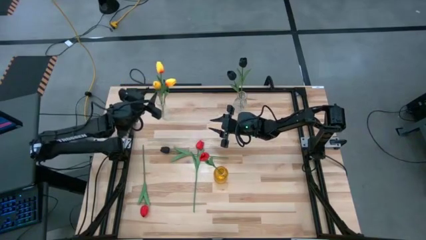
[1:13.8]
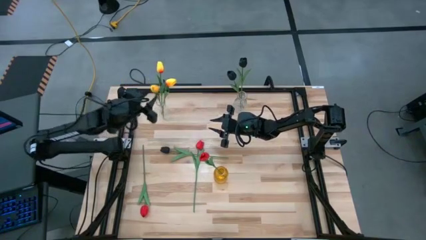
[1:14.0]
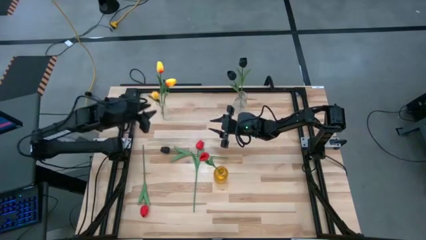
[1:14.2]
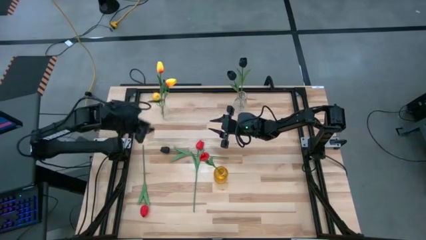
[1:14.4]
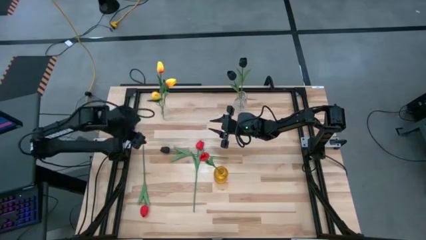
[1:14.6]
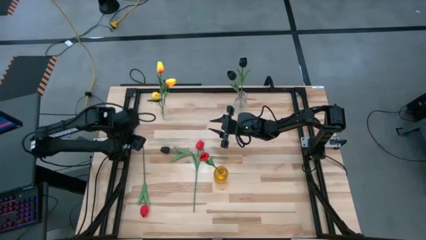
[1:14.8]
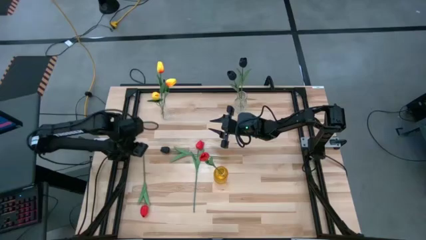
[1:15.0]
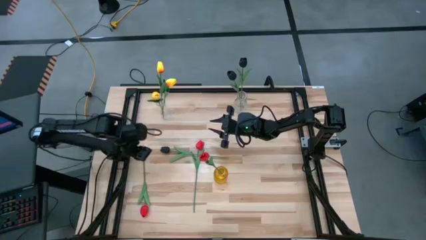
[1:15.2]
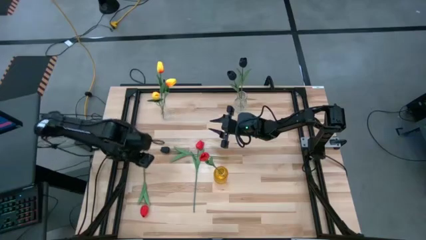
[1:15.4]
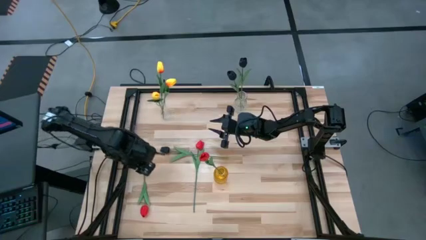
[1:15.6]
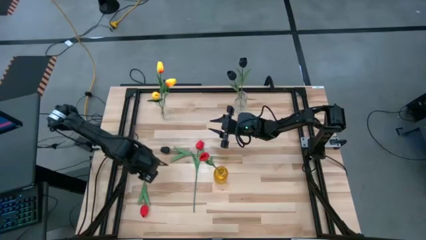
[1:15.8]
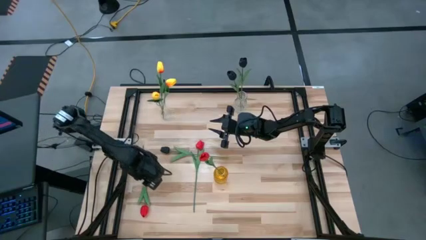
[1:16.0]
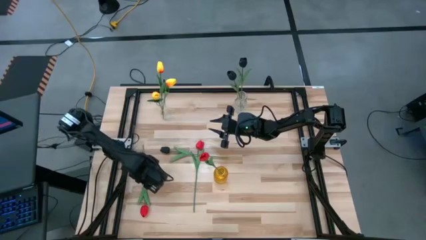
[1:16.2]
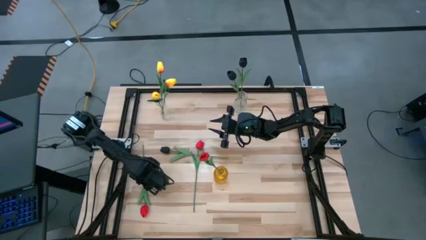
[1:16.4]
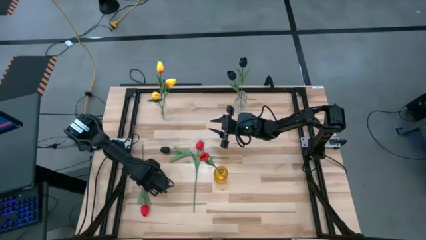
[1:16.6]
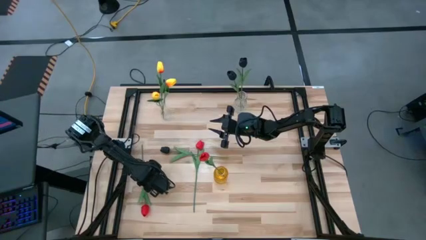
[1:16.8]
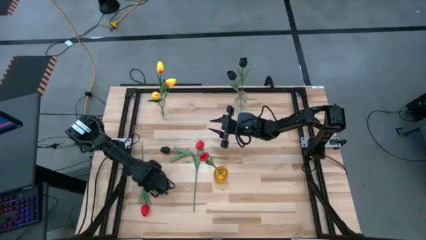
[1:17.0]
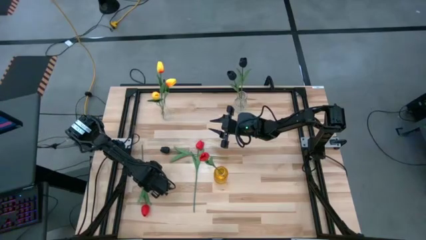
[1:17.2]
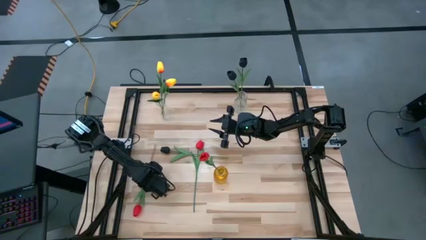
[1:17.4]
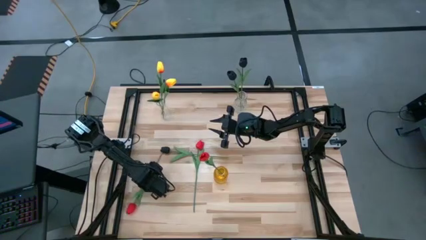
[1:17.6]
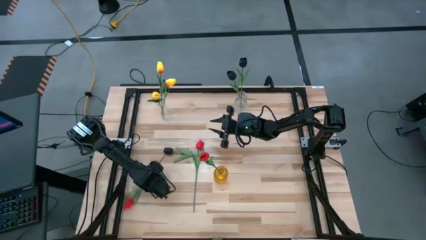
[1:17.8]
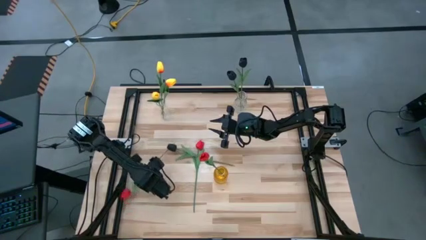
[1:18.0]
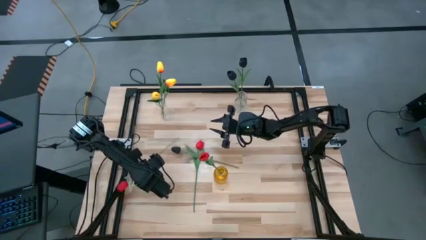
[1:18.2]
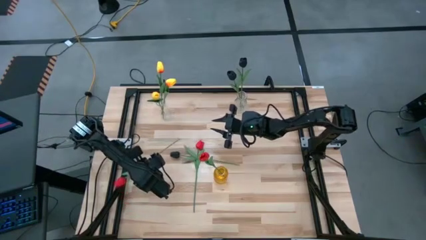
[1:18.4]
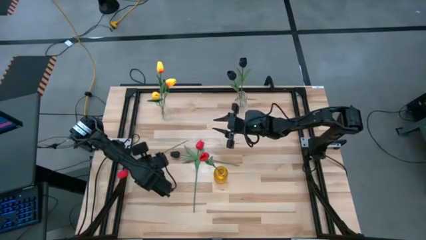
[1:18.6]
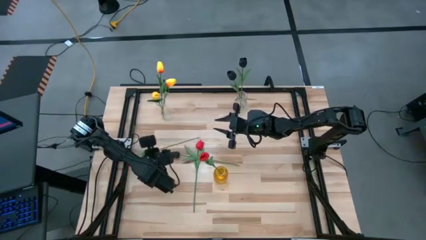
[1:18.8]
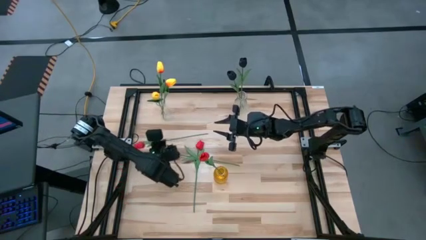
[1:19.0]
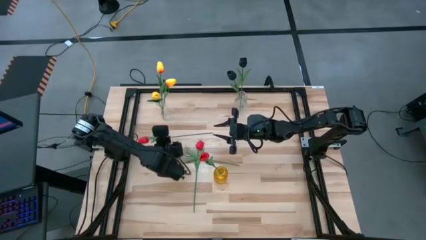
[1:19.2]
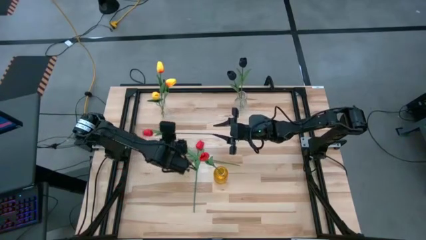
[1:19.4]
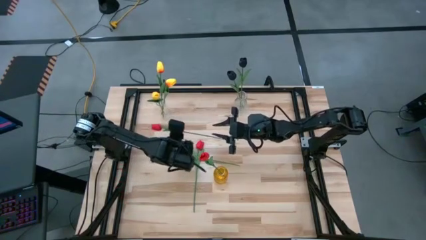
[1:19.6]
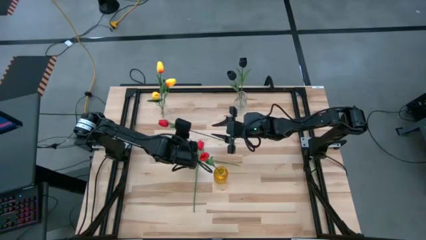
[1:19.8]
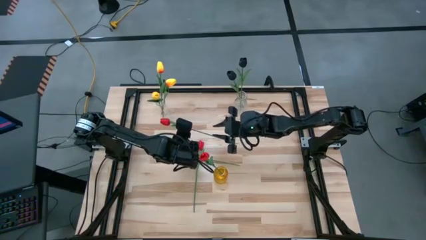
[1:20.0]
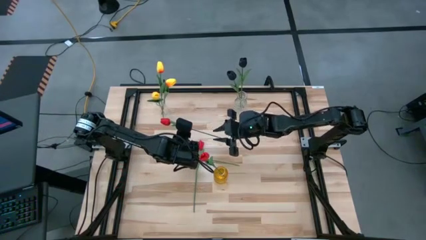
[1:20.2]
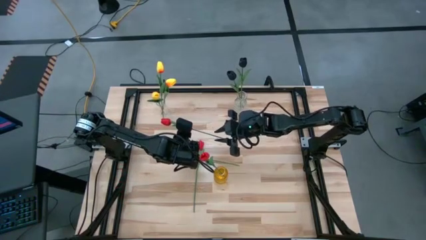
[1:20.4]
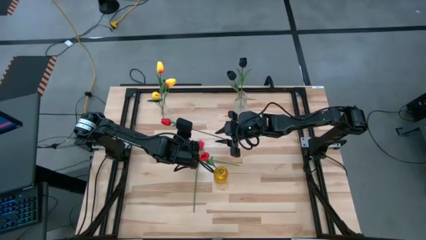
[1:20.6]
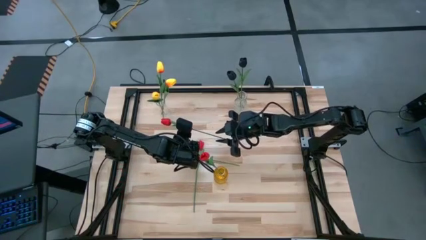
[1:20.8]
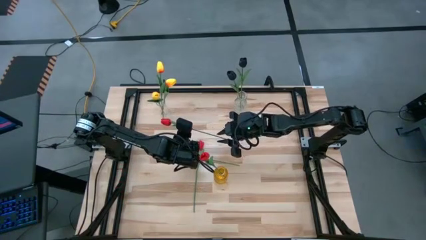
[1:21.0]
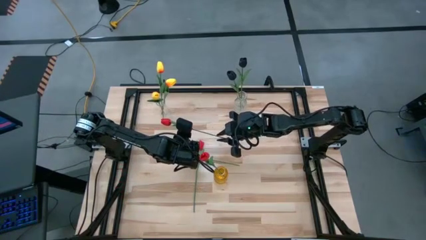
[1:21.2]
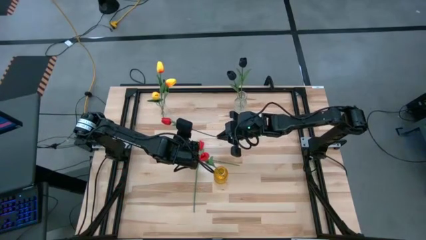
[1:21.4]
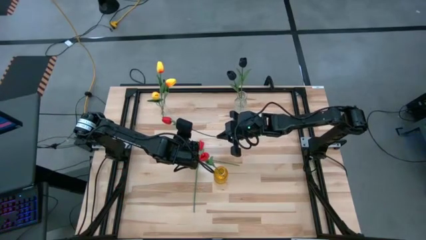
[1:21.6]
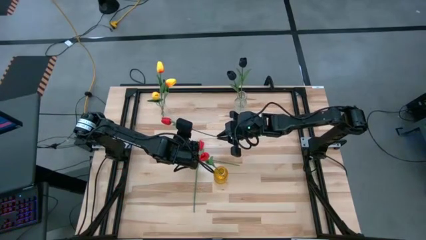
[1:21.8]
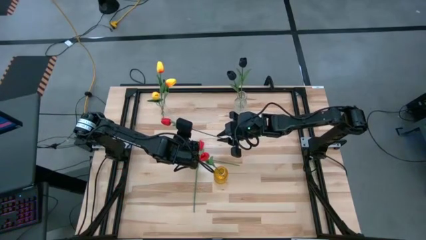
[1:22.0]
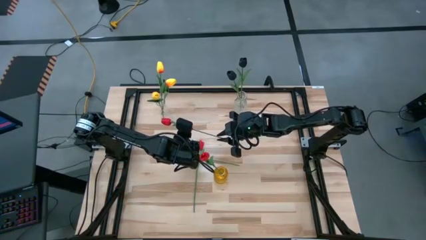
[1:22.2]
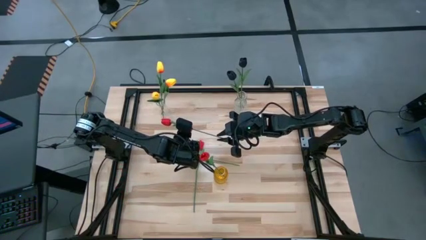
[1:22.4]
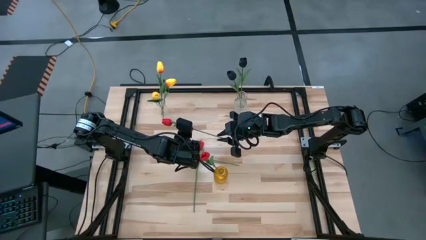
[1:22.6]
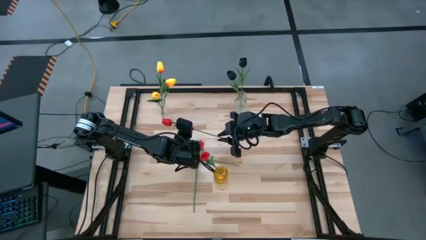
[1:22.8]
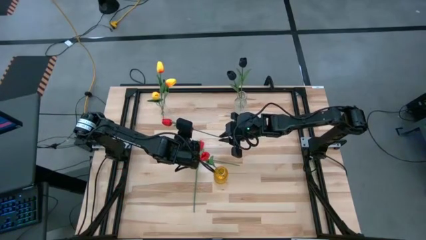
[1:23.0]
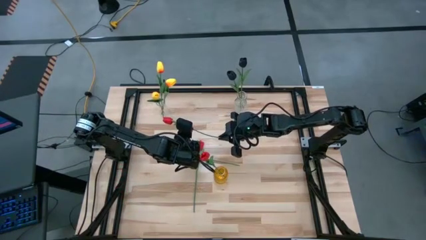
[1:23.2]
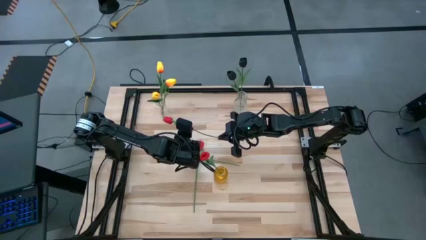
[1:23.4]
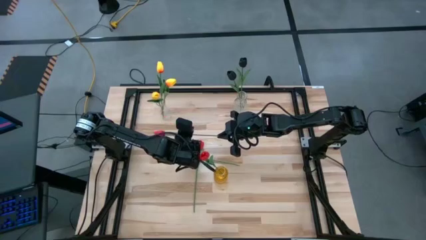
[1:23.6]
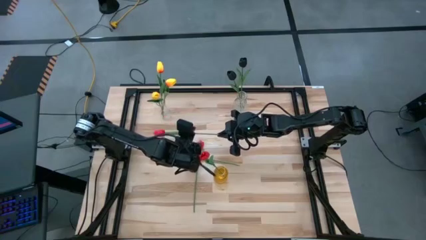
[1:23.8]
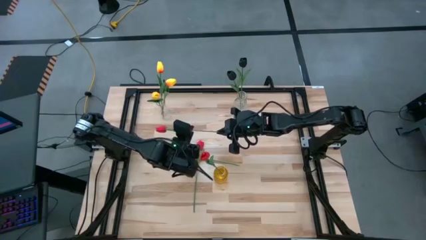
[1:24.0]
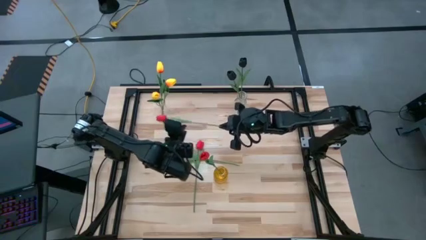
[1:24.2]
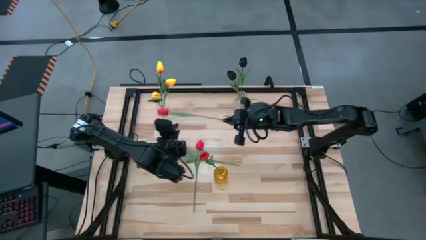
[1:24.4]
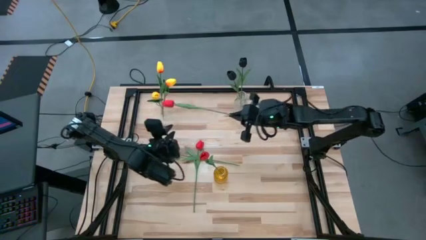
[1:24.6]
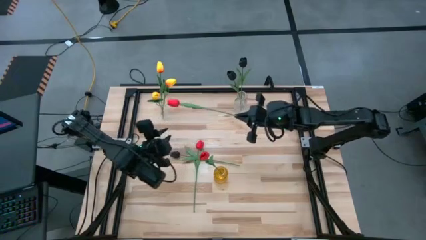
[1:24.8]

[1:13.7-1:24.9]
Task: Sort flowers into vase by color
Put the left red flower into the yellow vase
